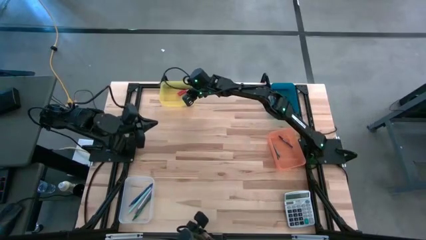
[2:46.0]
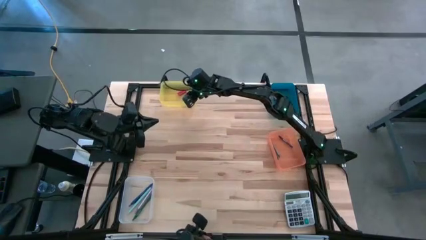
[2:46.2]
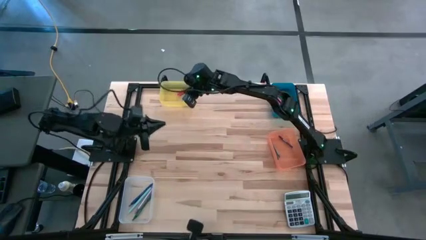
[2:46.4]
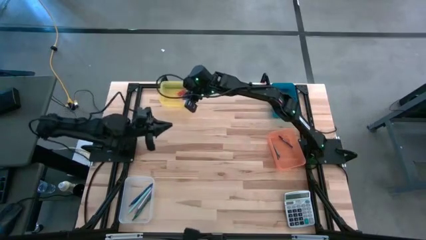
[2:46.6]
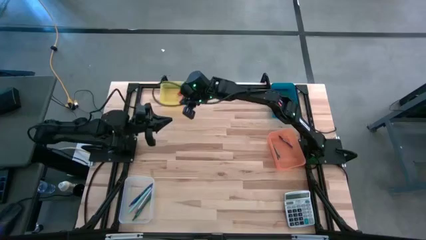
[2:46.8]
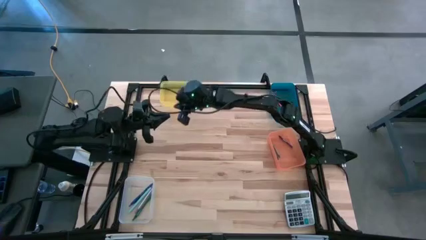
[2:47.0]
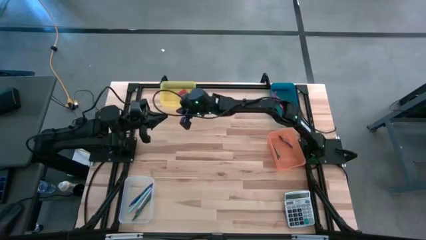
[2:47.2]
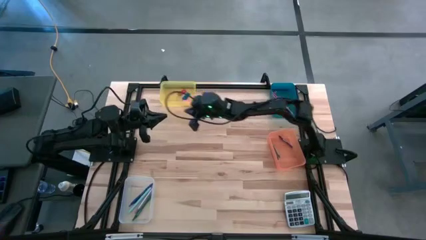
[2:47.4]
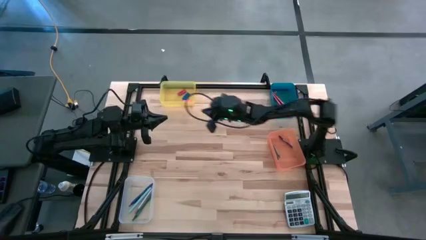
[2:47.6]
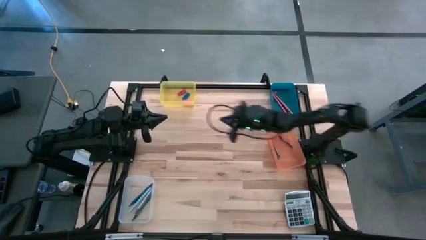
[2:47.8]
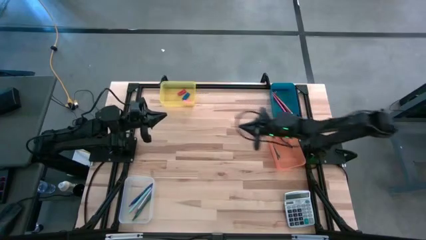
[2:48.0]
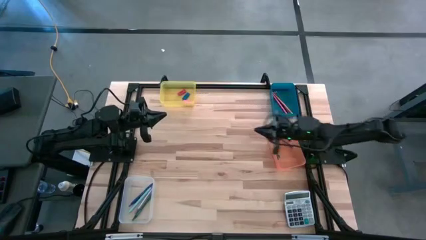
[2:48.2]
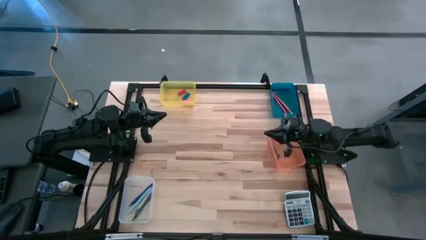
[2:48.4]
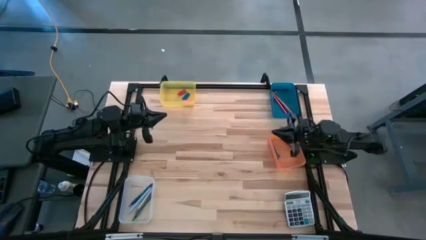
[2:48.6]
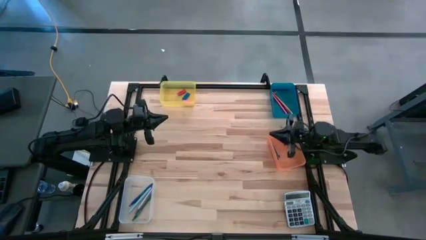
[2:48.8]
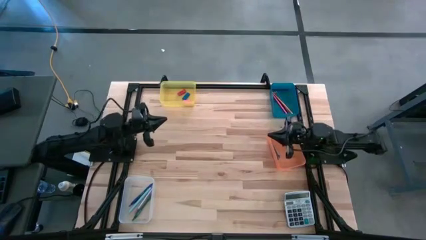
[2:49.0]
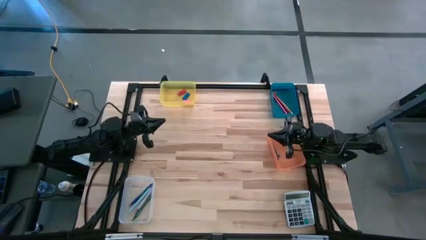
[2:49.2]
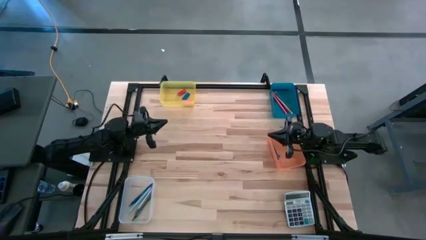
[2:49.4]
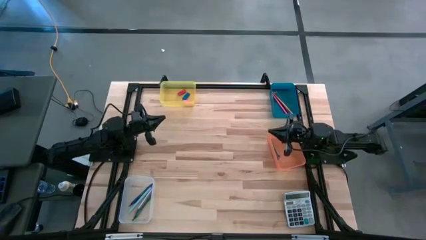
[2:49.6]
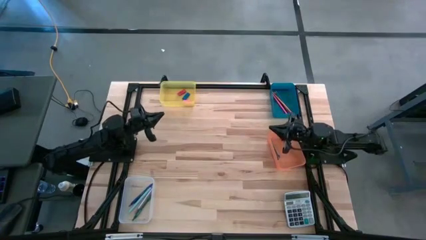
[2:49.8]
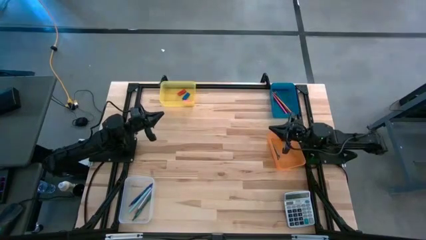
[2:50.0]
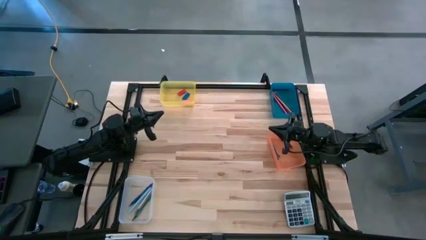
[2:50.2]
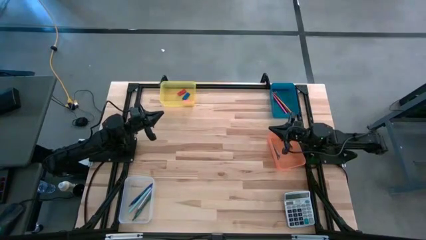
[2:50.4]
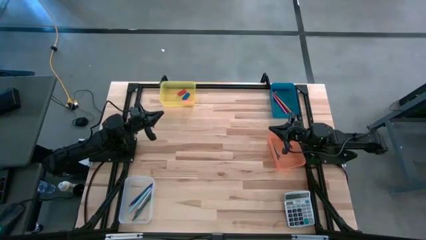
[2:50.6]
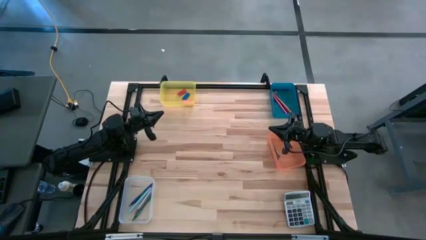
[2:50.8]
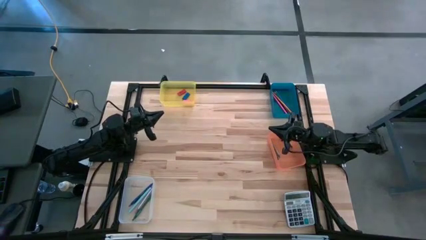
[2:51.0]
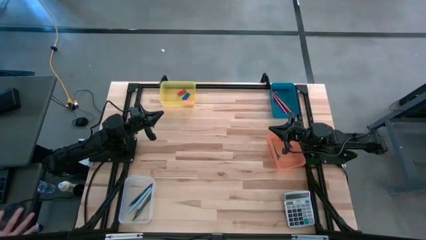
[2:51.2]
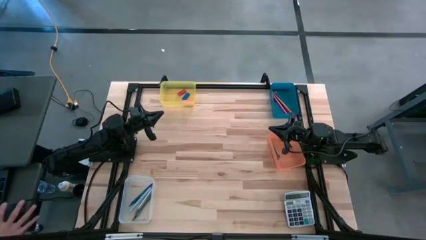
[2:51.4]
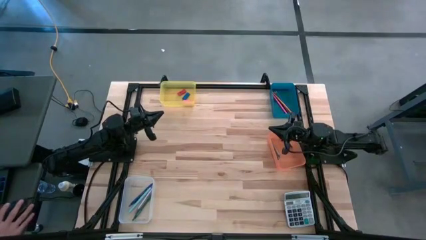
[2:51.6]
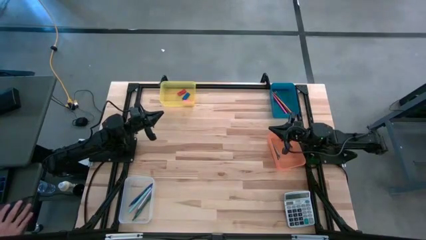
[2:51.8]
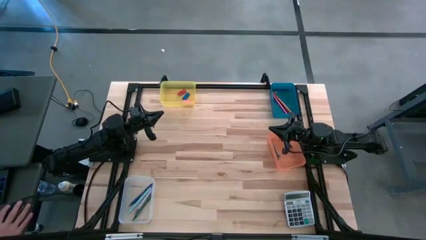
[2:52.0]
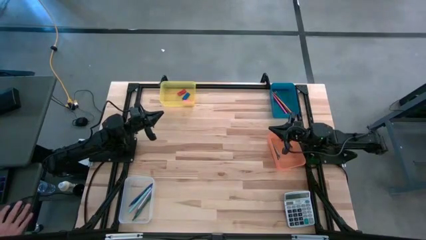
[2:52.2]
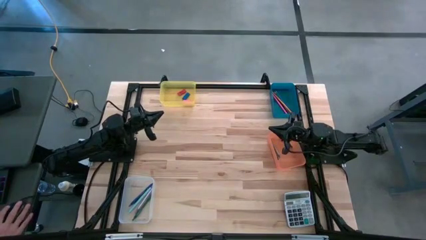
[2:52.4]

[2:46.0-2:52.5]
Task: Sort crayons/erasers/pens/pencils in bins
Return to Home Position

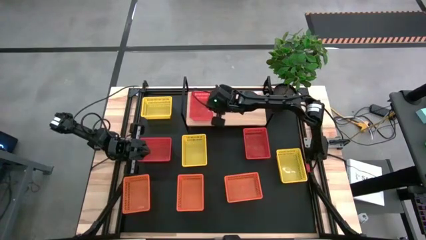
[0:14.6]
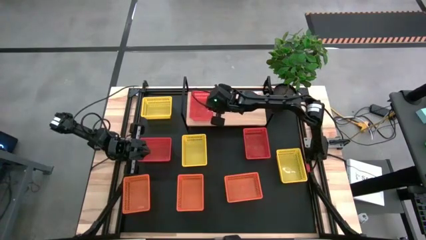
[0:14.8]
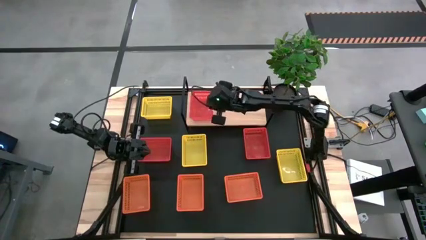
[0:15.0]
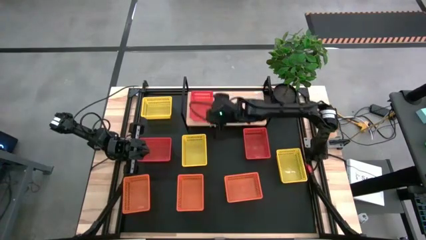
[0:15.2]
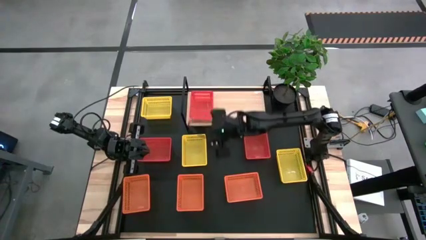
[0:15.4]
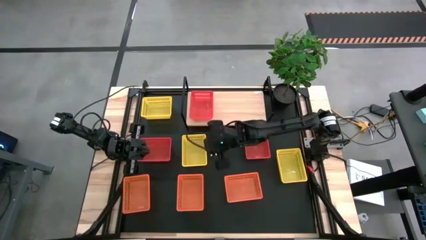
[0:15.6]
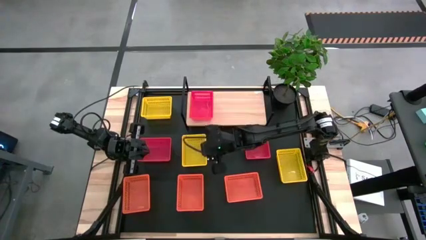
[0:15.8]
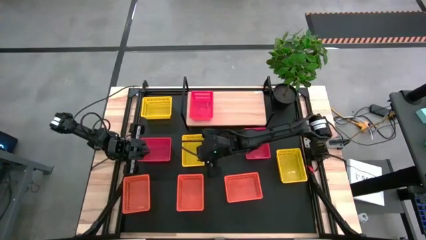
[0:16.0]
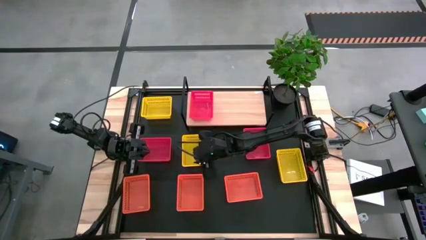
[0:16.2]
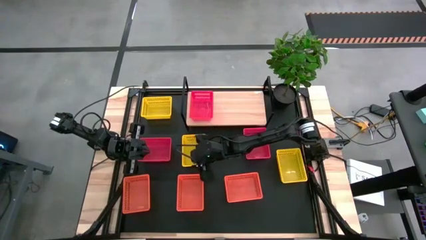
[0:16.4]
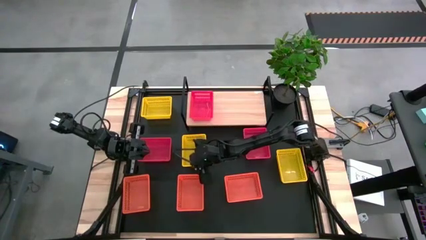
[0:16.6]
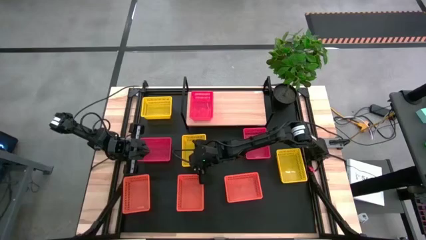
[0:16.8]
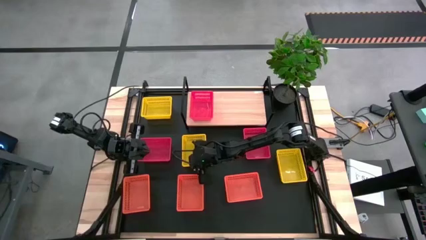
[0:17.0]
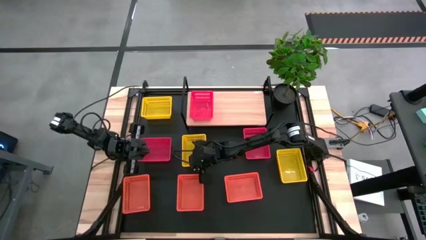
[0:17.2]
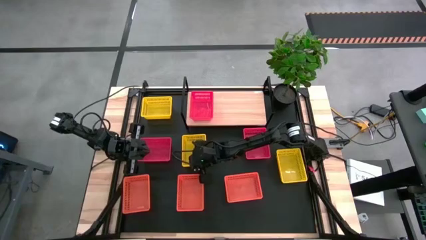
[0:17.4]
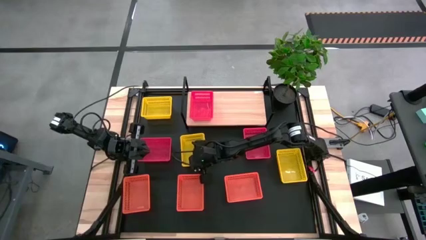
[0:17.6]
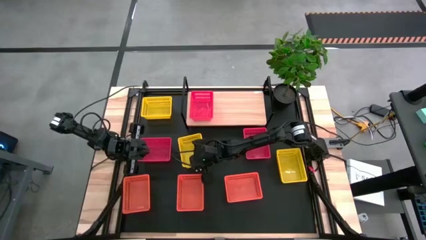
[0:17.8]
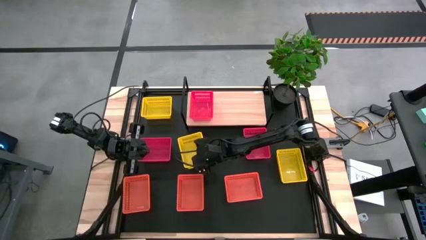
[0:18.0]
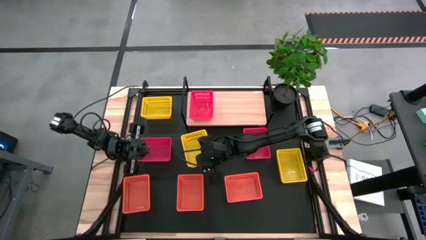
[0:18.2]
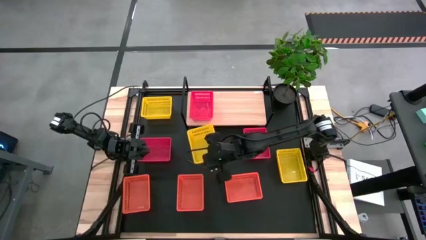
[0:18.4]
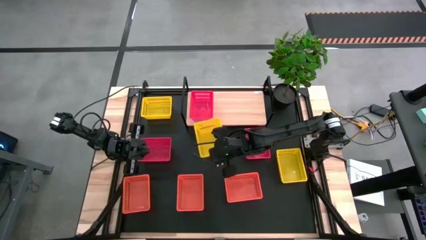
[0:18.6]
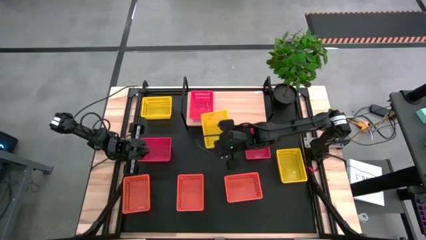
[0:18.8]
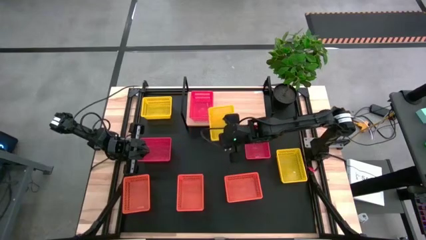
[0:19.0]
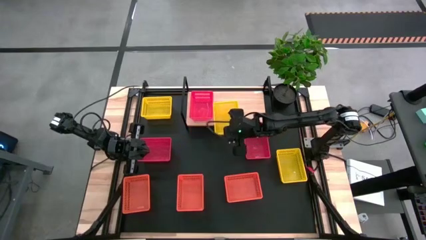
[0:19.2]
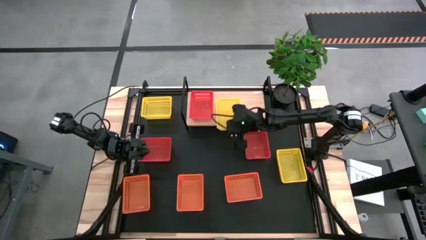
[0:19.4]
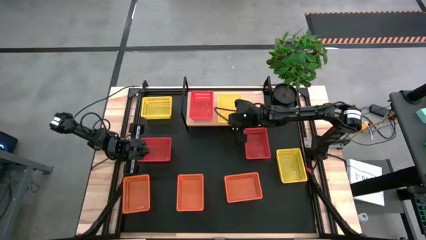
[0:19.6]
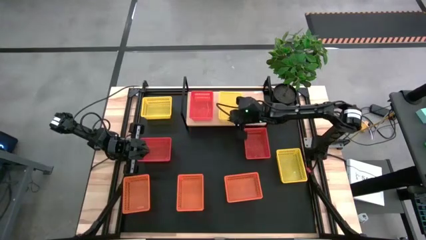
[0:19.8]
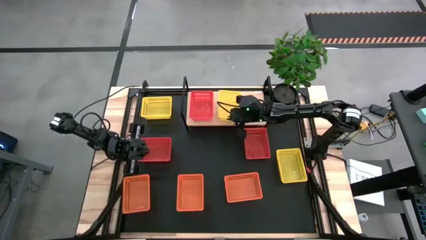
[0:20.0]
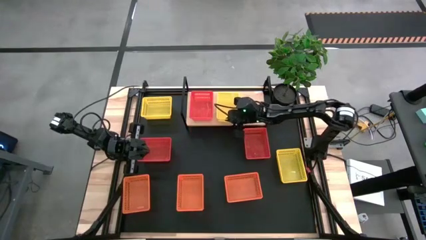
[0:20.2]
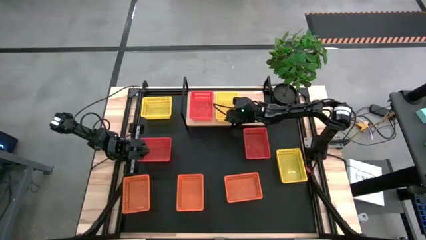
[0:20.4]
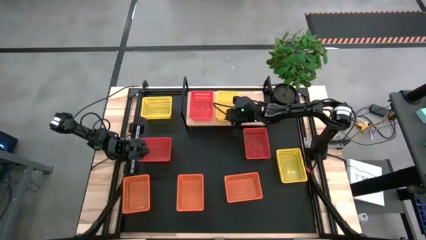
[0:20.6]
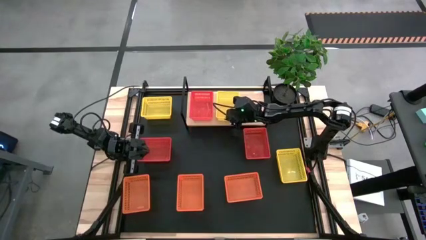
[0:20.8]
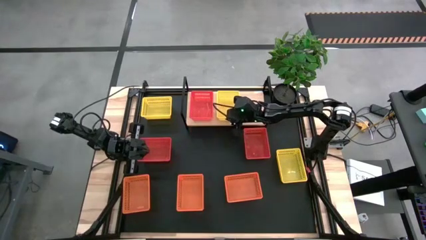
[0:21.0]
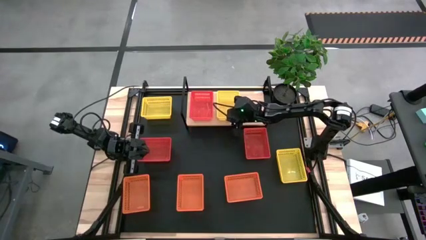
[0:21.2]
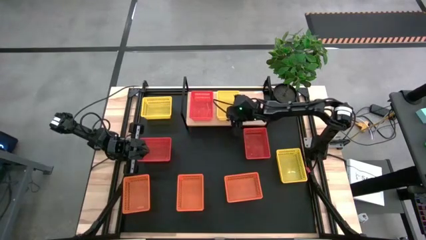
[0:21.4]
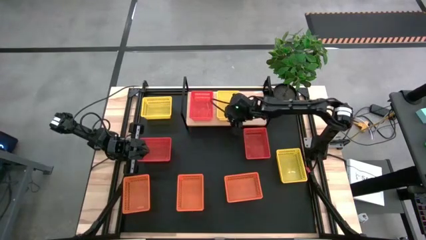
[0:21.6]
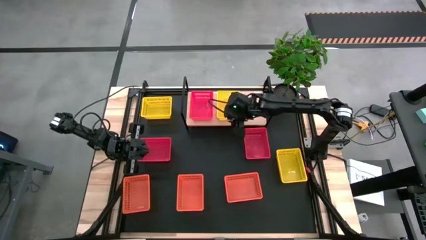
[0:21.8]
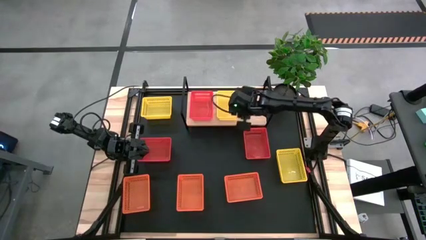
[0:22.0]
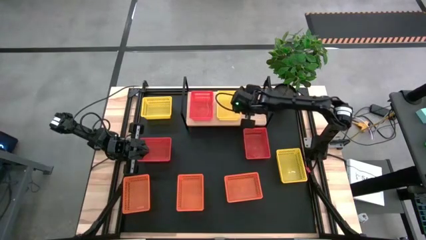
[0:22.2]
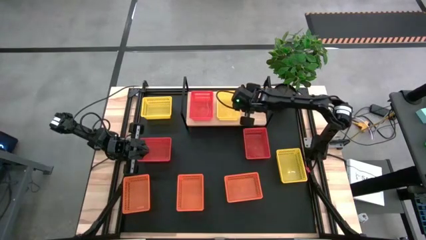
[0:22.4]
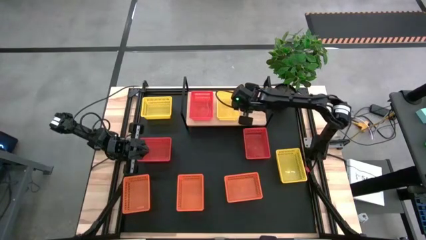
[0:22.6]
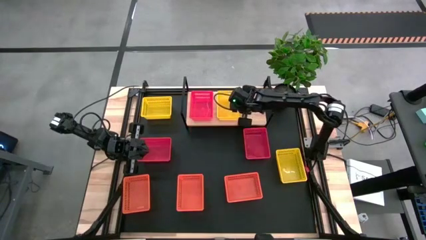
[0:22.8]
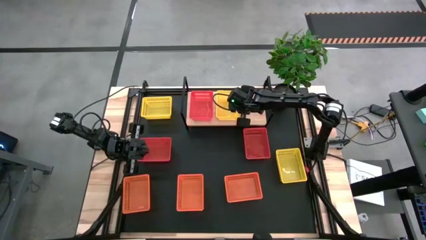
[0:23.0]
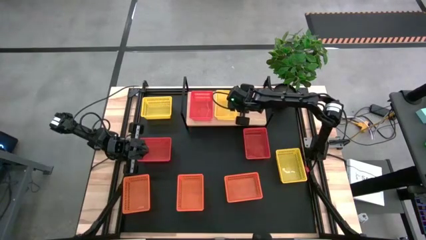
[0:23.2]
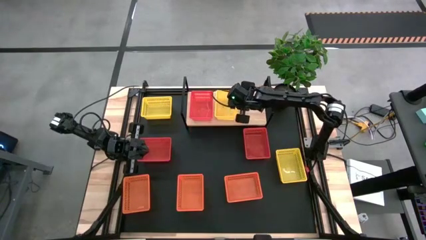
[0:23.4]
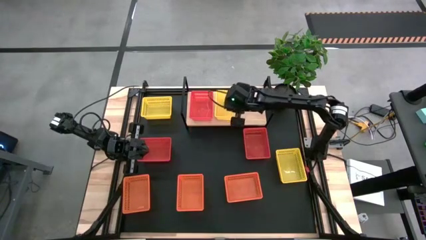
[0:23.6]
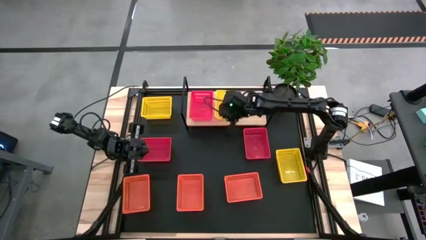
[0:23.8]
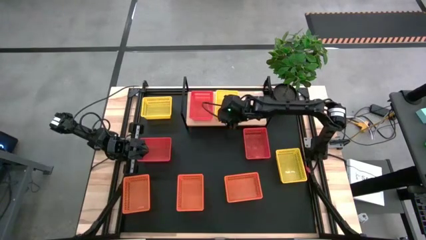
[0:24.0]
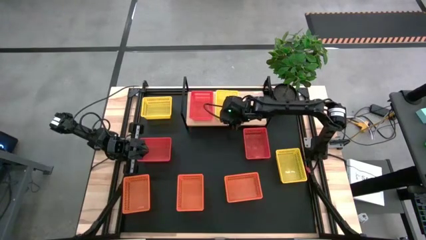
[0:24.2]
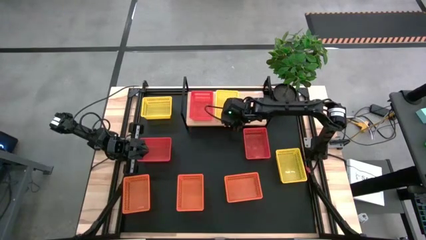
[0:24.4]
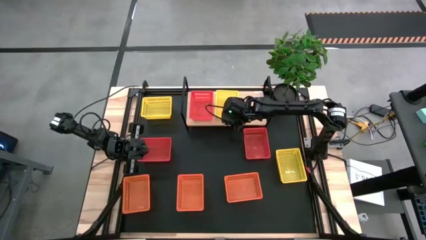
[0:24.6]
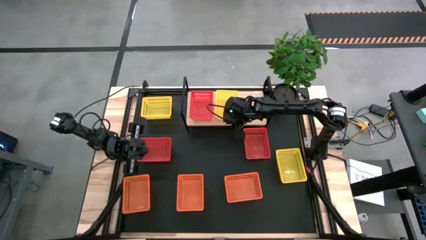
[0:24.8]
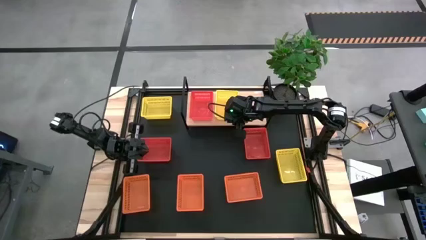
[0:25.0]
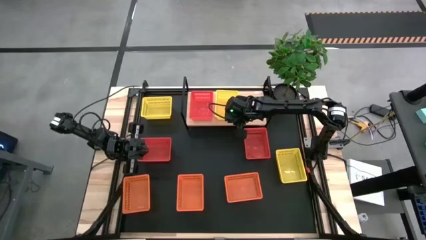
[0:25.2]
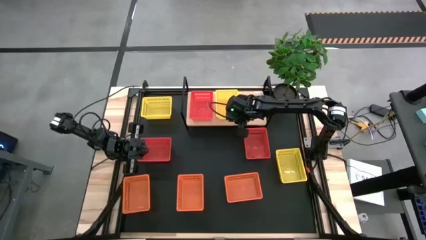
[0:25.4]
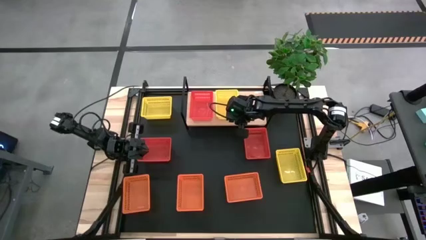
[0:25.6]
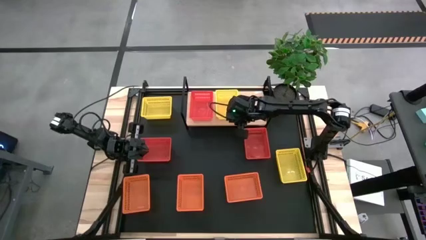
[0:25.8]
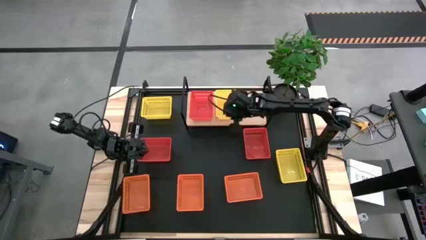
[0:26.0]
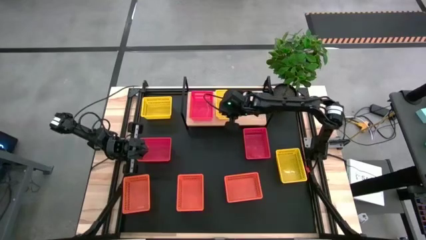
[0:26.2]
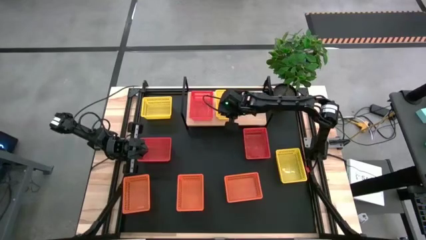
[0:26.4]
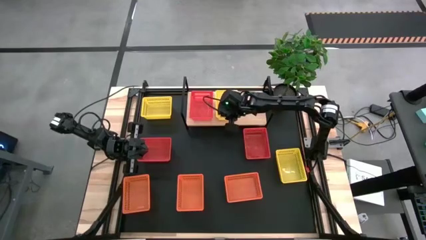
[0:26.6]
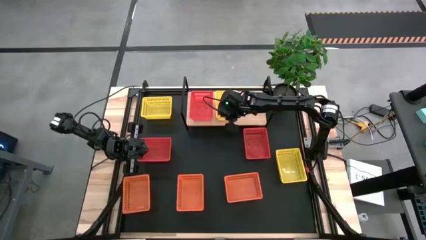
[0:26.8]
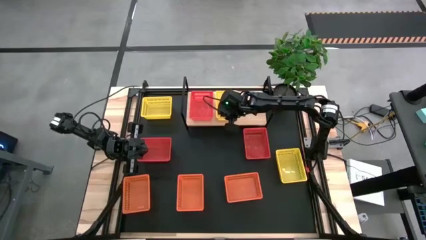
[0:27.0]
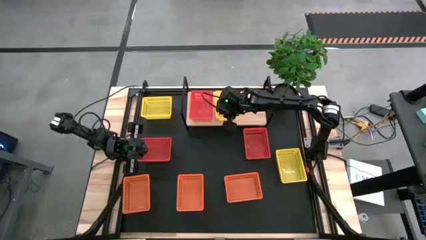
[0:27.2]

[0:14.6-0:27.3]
Task: Stack baskets on shelf by color
Put the middle yellow bin on the shelf
